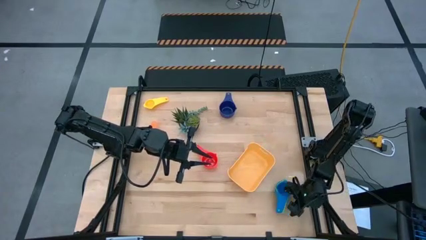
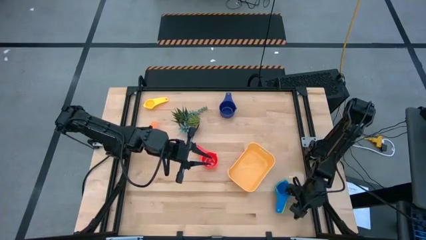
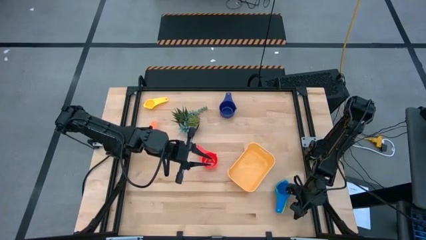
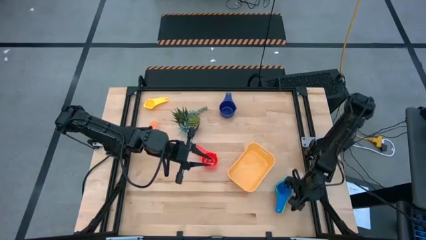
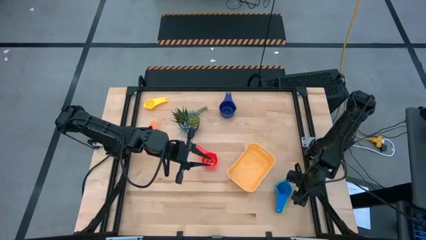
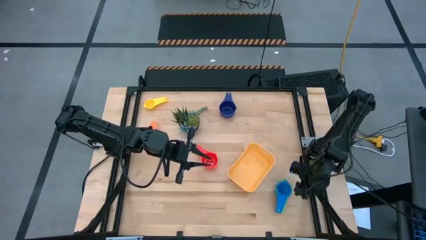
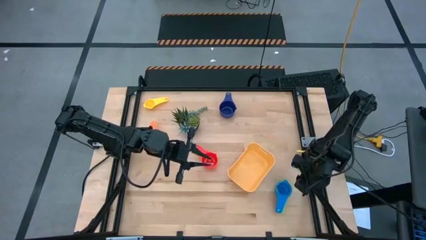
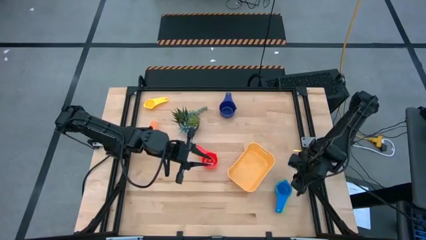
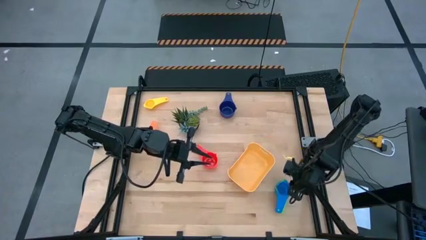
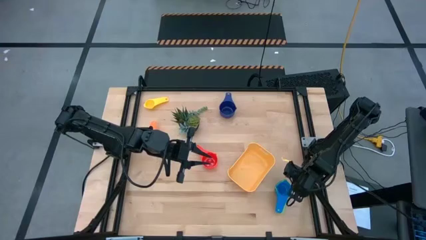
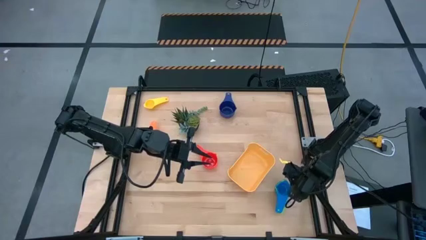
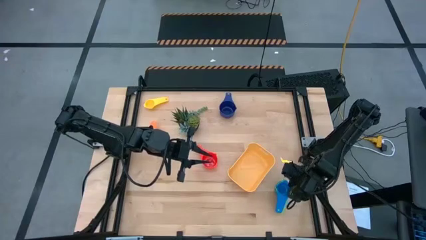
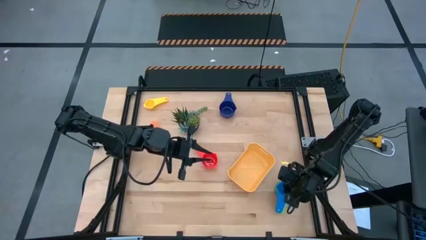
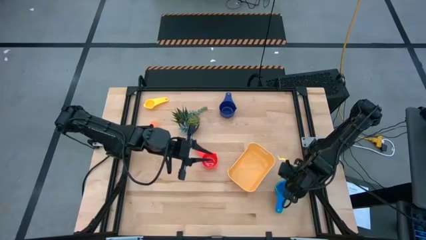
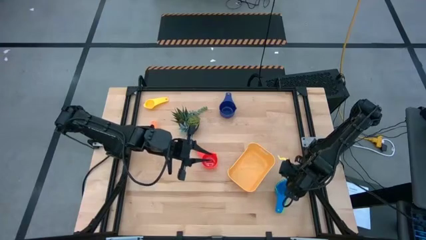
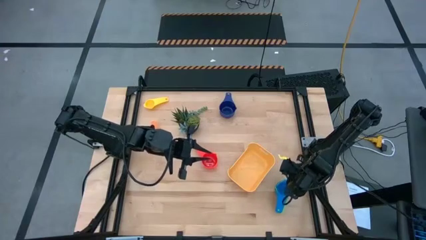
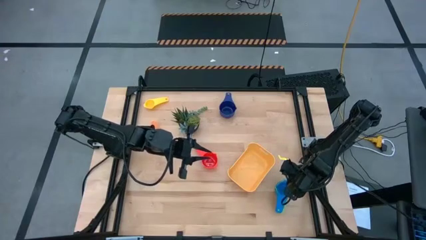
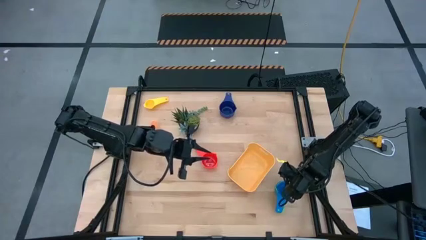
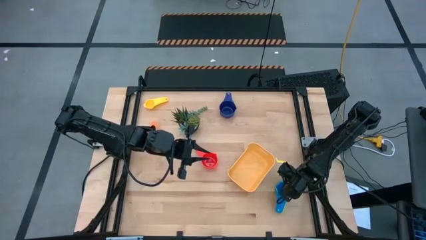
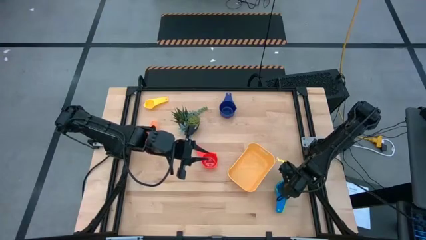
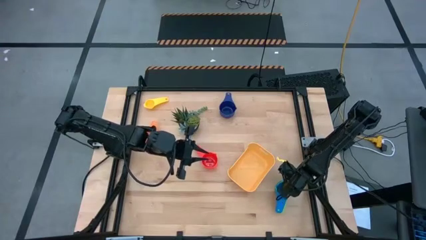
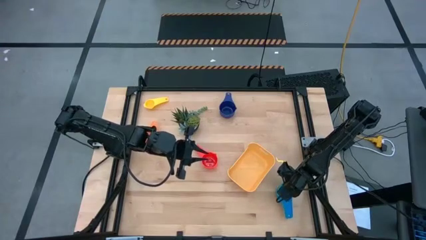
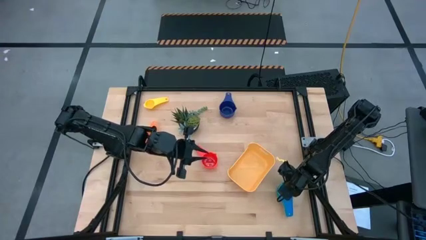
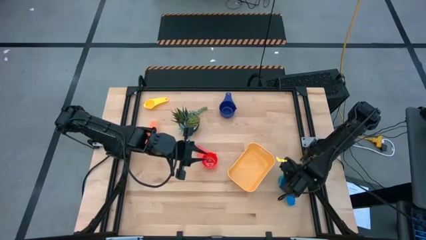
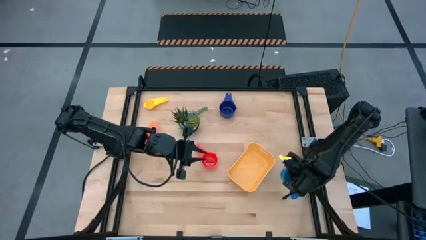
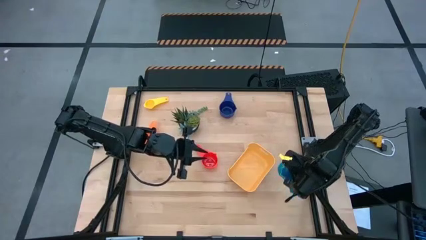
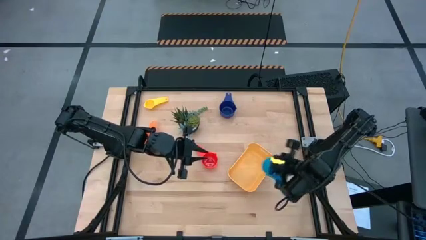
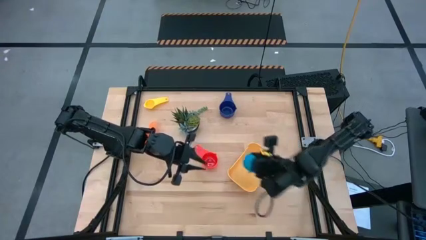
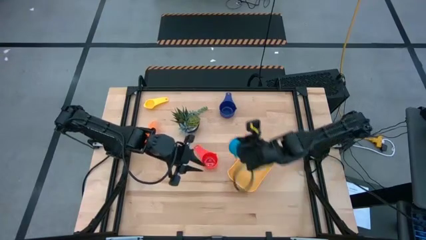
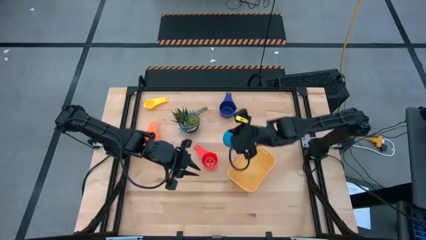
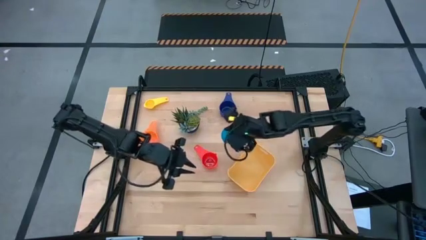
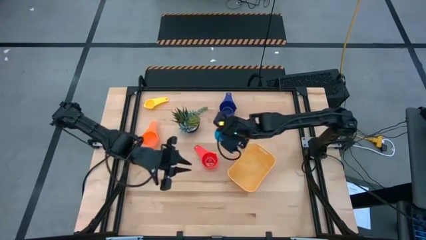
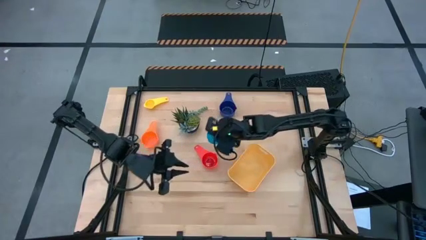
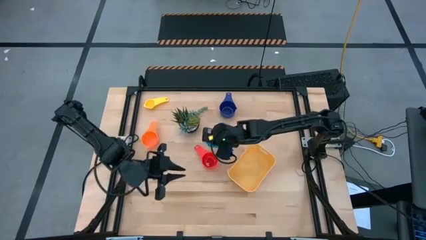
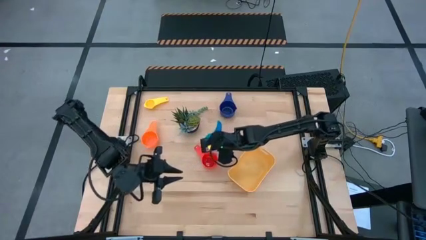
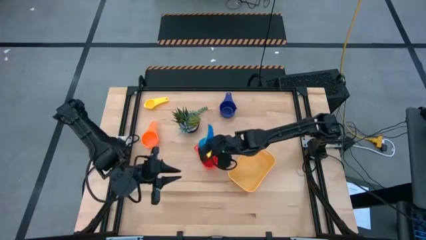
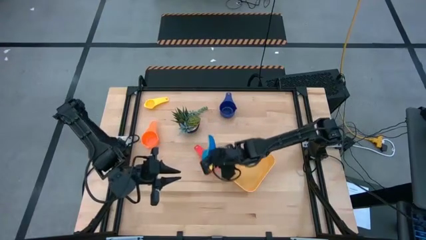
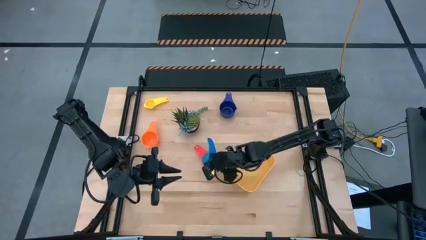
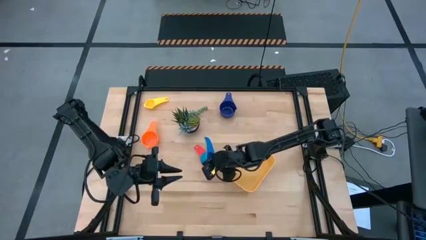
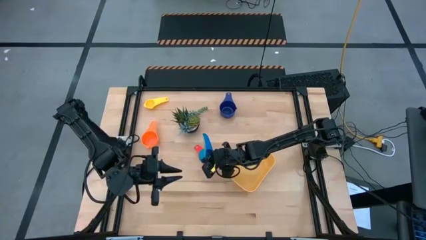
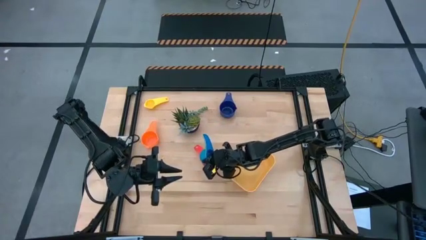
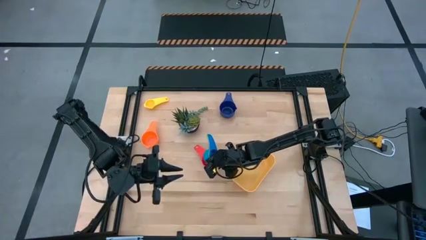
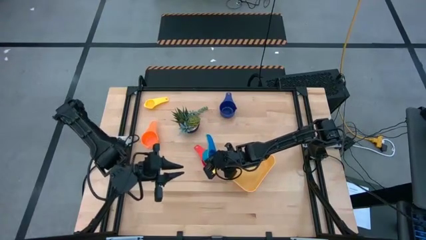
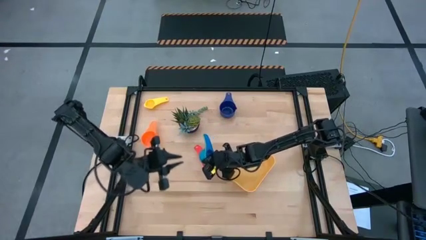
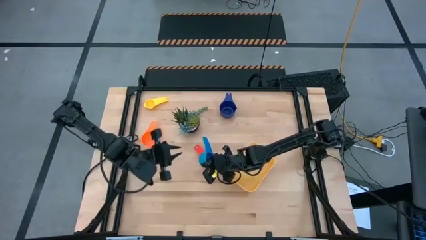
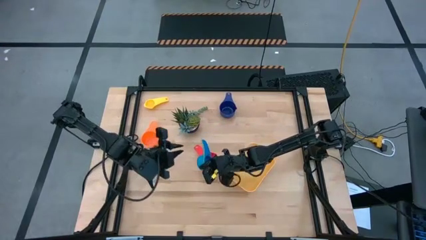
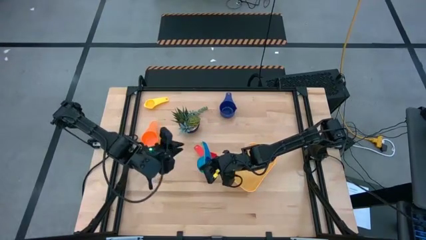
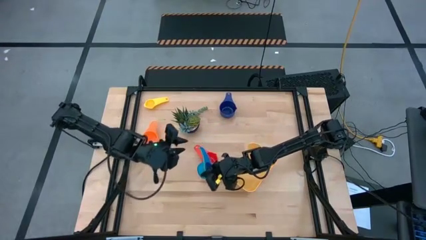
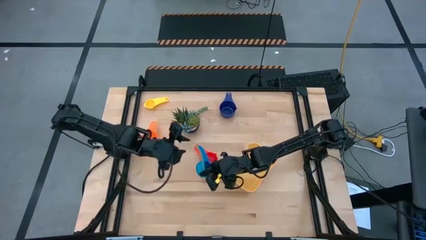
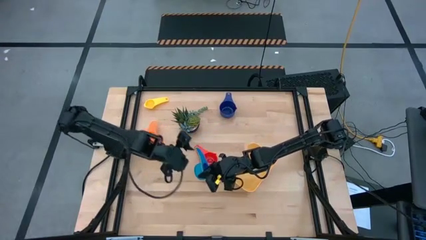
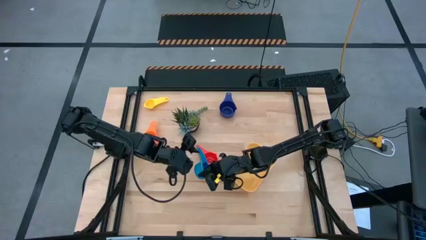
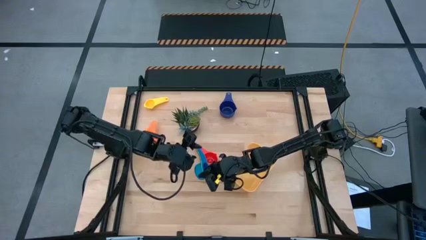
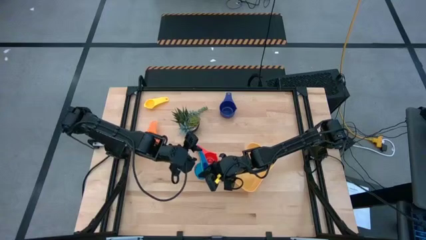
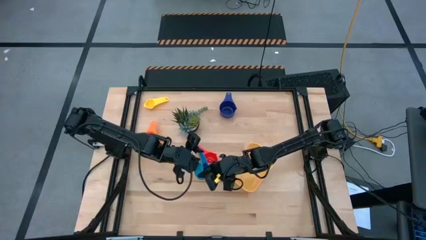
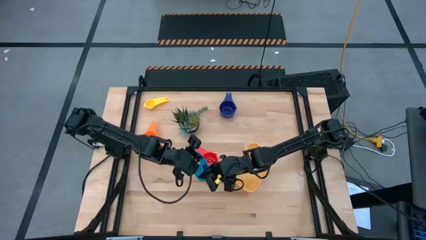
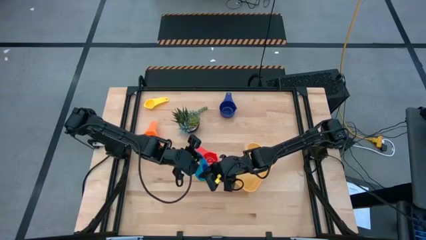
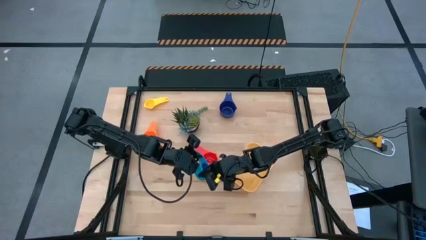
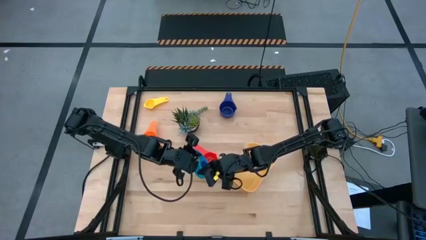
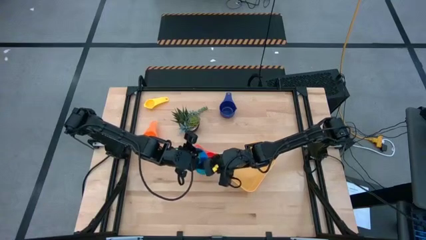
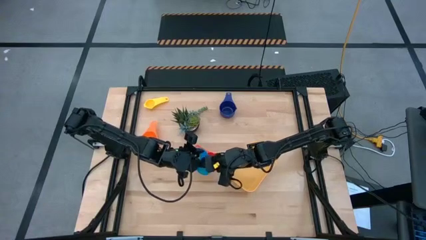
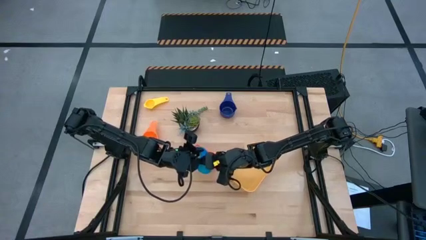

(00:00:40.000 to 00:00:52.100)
Task: Nest measuring cups in basket
Stack the measuring cups on the red measuring cup

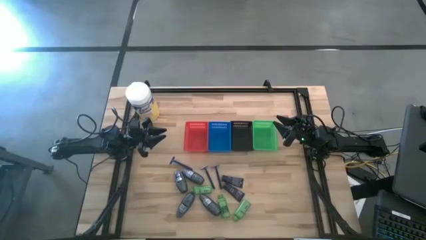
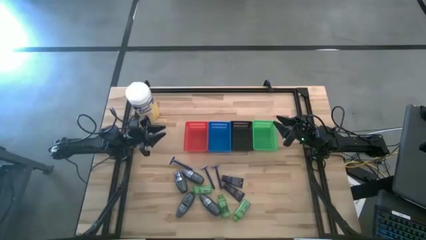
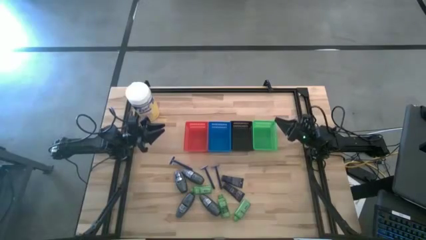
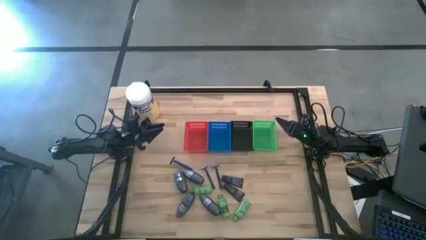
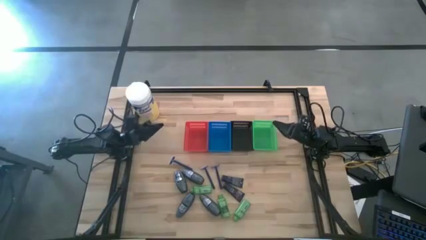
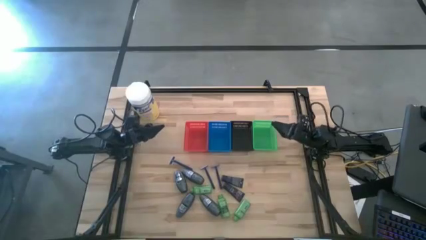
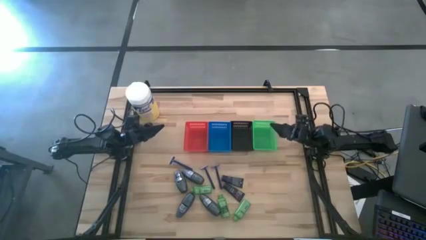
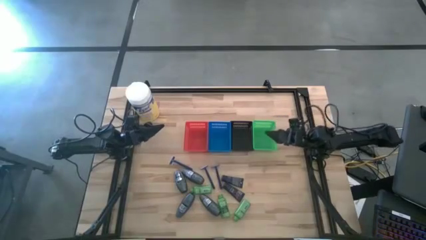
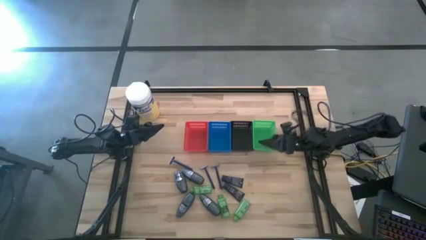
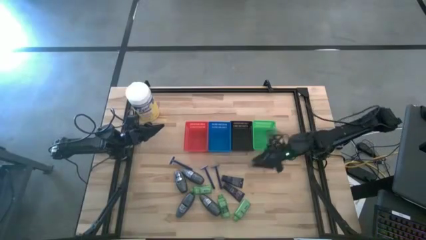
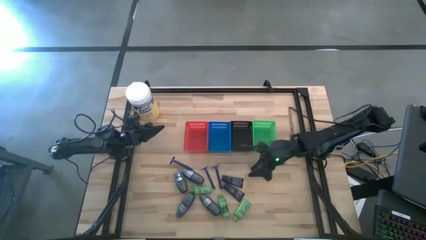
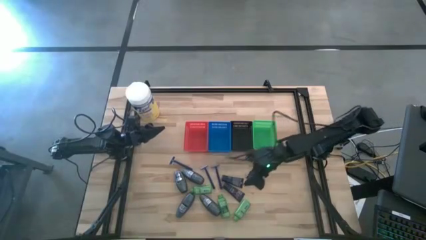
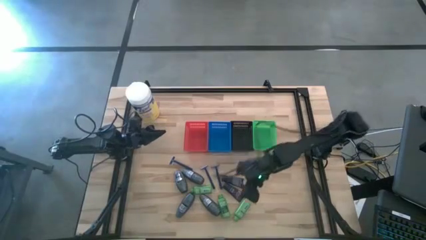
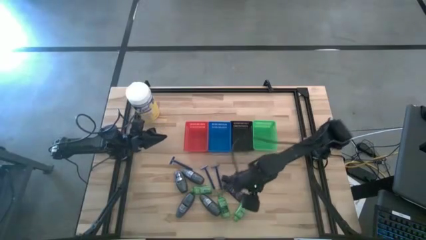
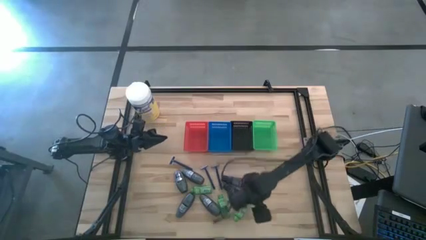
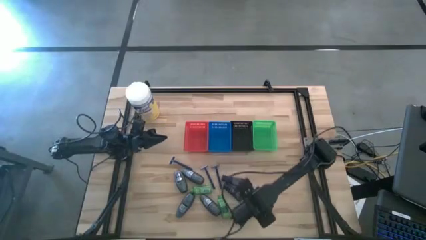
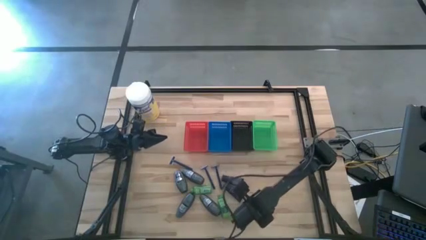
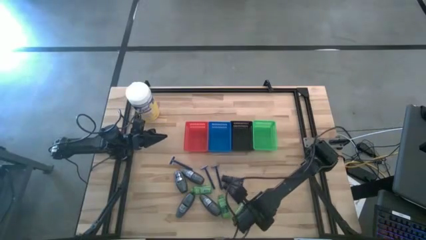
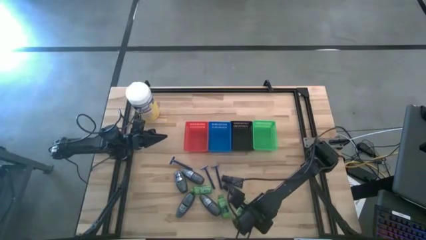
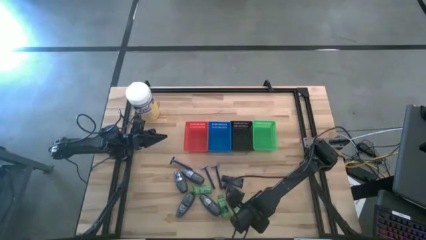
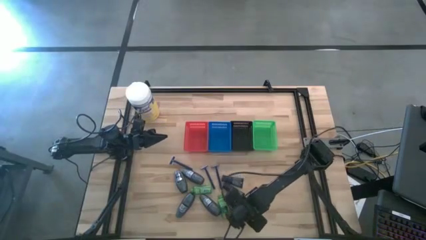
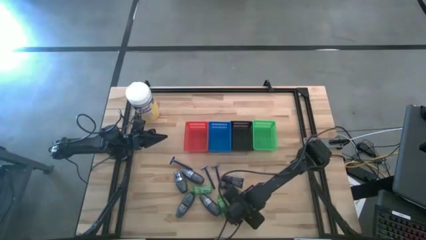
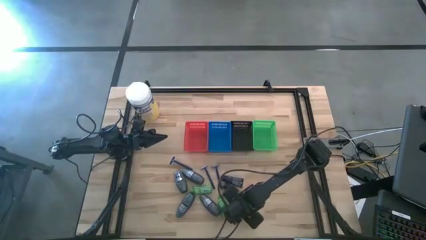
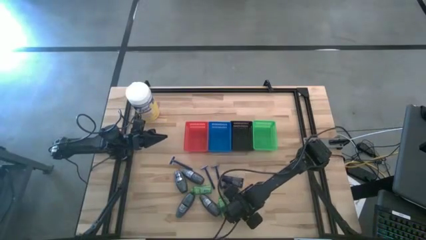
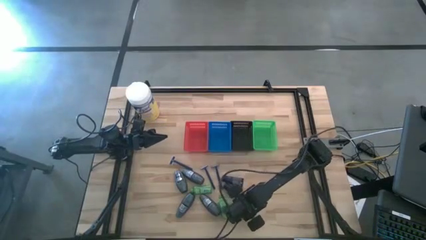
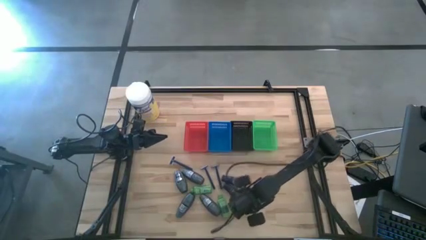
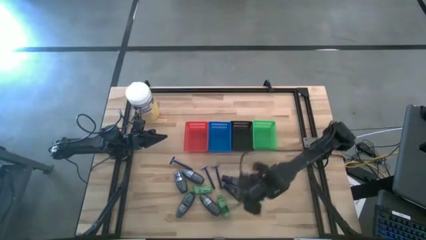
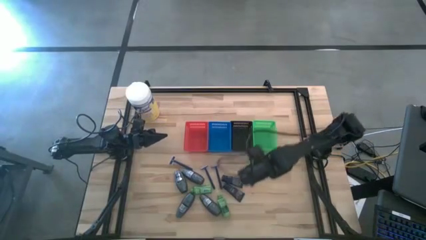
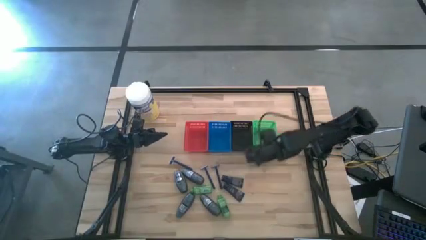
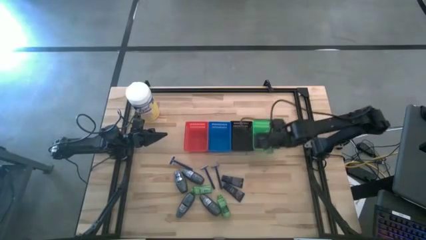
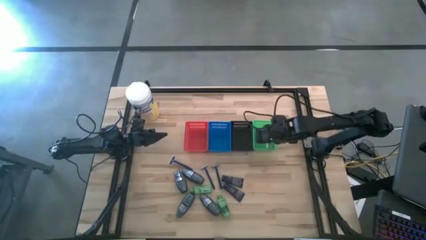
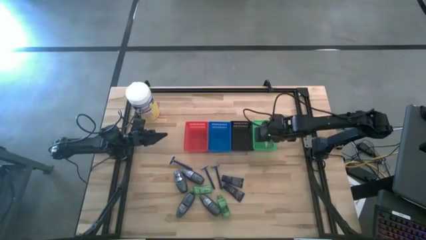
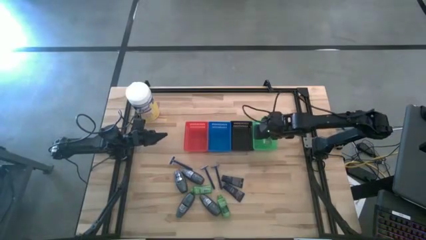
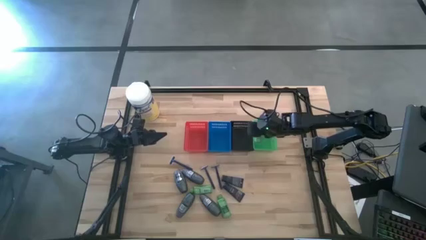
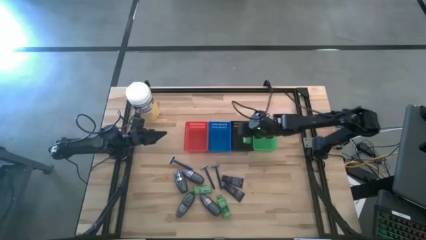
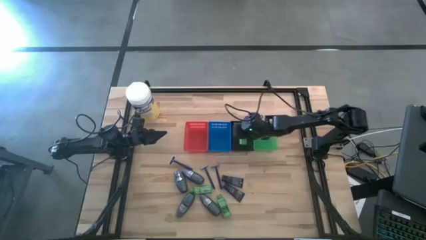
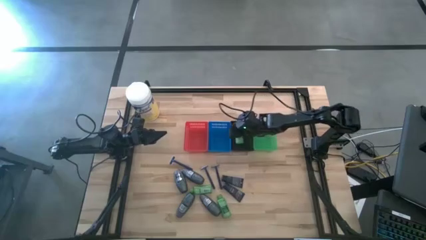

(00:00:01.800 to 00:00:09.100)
Task: Pick & Place Travel size toiletries
Put the shampoo into the black basket
